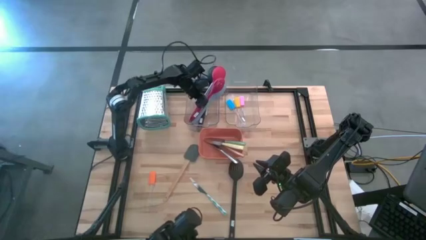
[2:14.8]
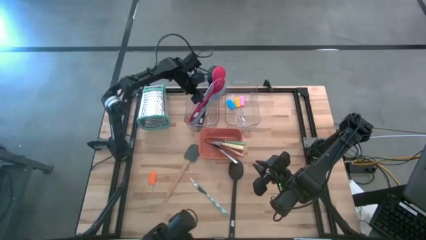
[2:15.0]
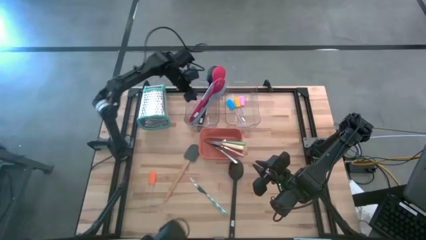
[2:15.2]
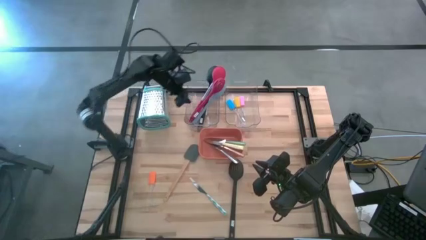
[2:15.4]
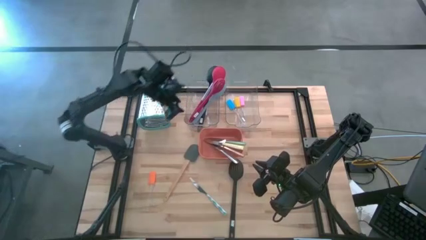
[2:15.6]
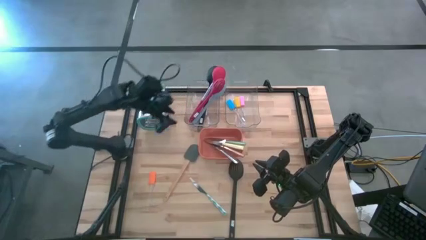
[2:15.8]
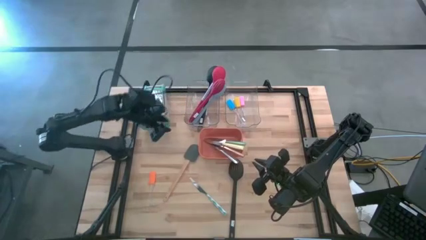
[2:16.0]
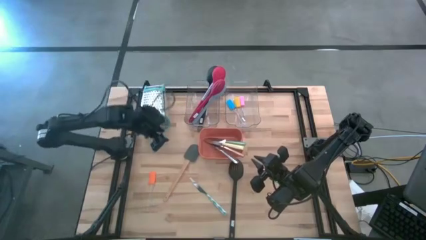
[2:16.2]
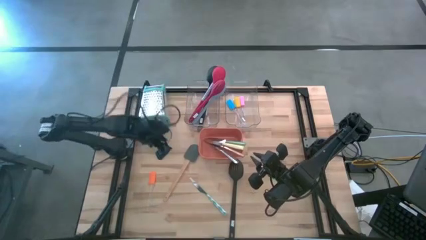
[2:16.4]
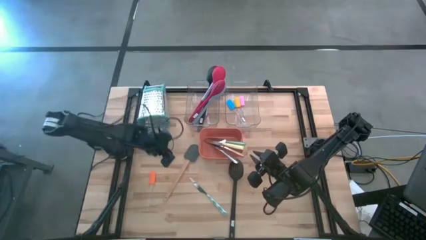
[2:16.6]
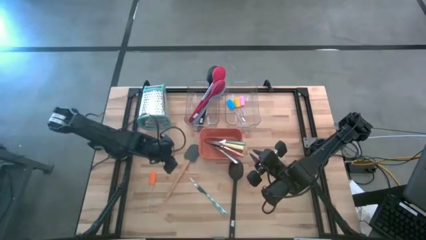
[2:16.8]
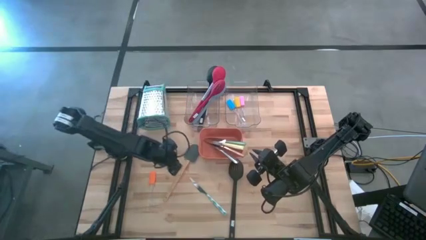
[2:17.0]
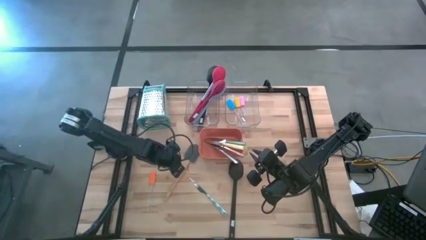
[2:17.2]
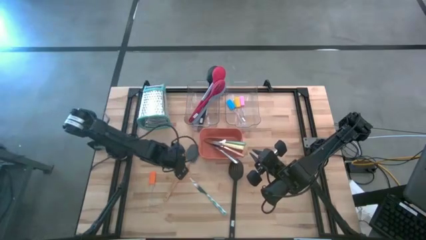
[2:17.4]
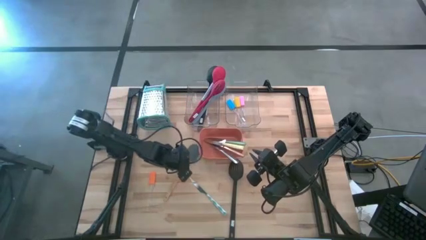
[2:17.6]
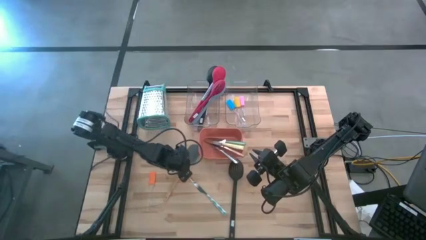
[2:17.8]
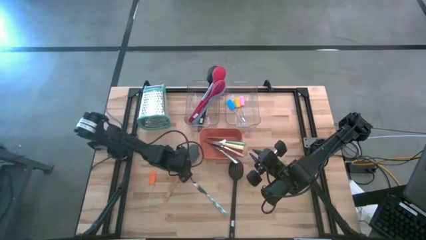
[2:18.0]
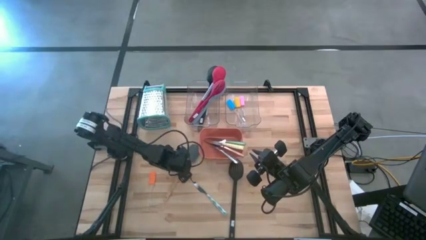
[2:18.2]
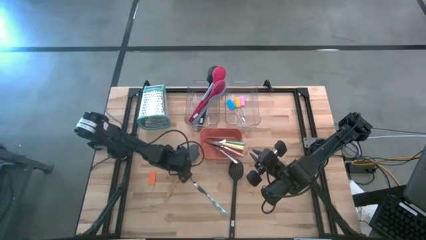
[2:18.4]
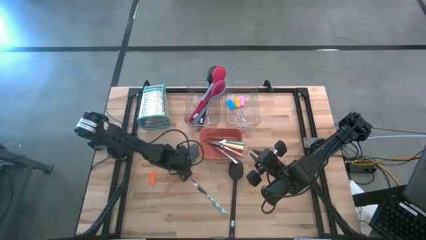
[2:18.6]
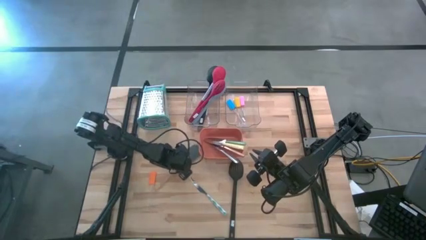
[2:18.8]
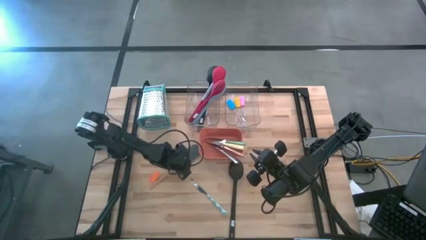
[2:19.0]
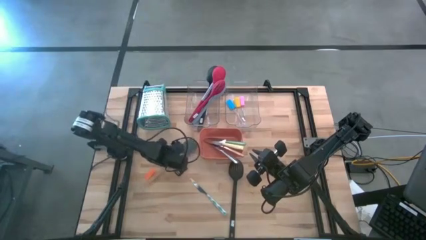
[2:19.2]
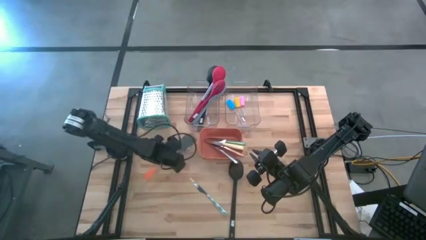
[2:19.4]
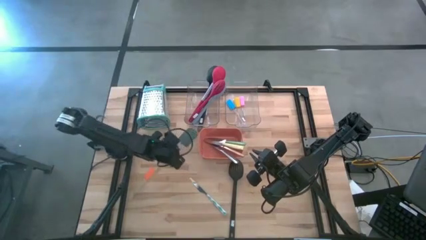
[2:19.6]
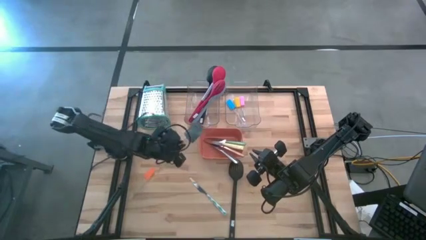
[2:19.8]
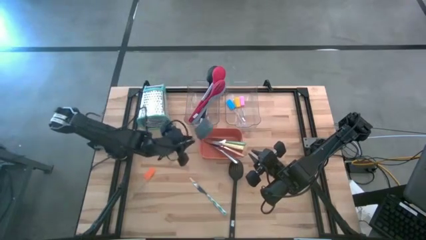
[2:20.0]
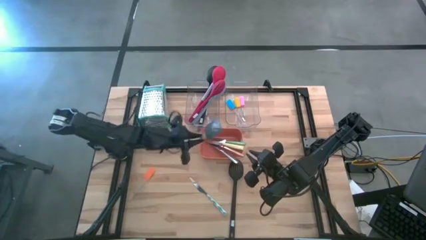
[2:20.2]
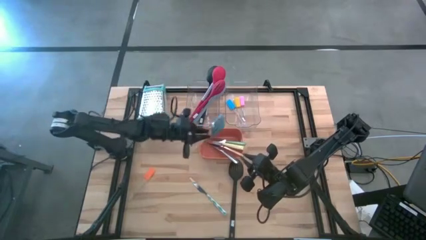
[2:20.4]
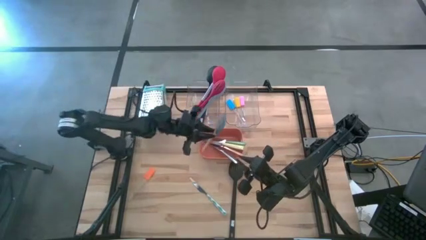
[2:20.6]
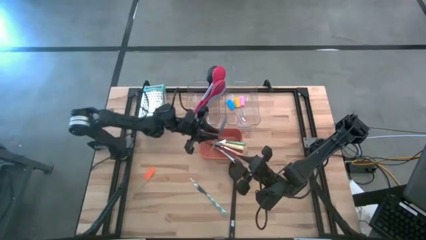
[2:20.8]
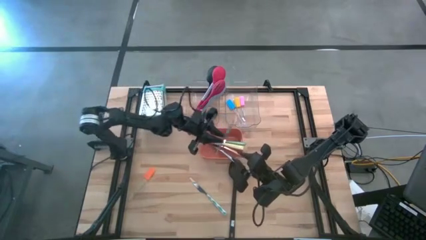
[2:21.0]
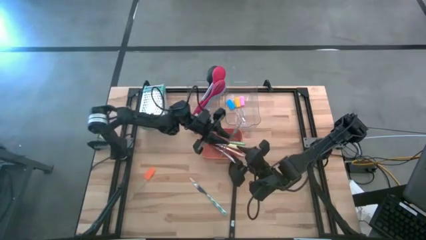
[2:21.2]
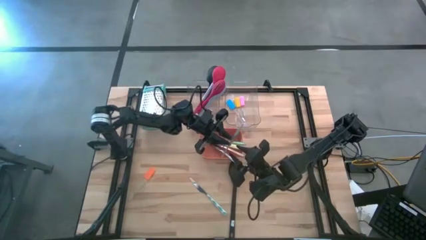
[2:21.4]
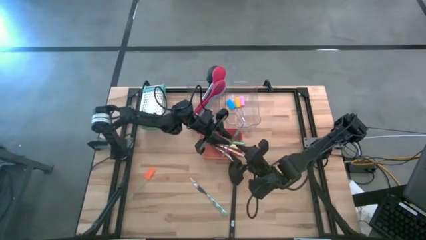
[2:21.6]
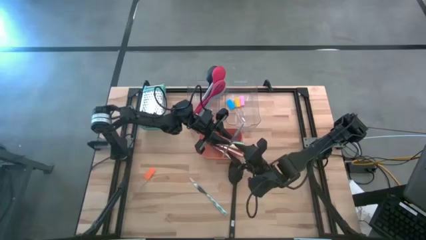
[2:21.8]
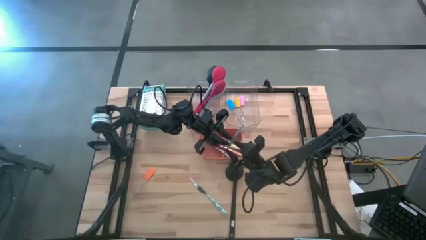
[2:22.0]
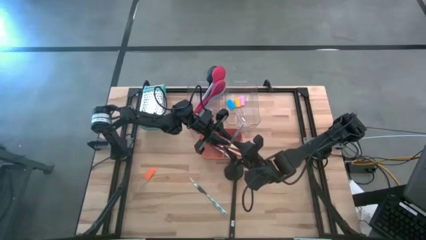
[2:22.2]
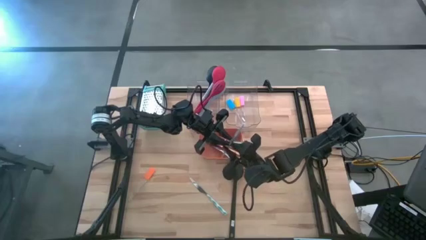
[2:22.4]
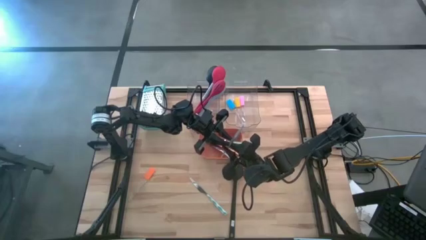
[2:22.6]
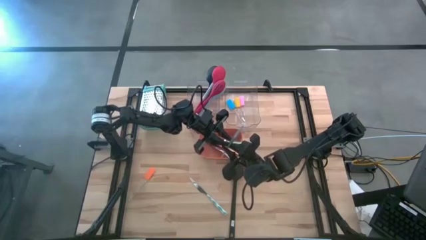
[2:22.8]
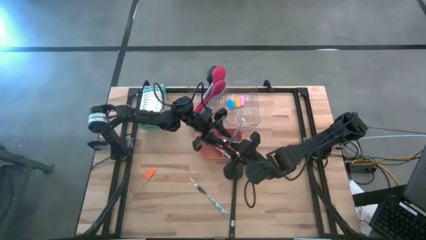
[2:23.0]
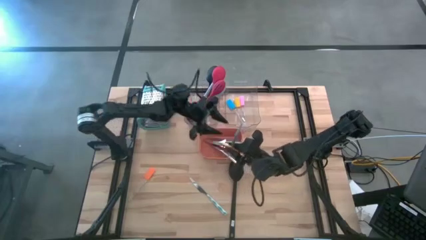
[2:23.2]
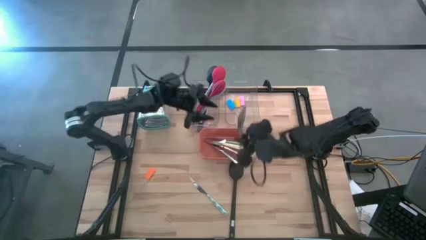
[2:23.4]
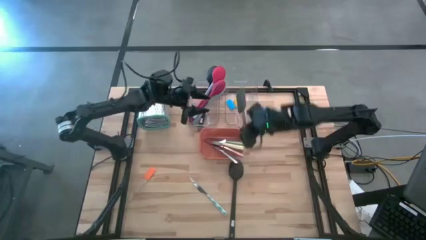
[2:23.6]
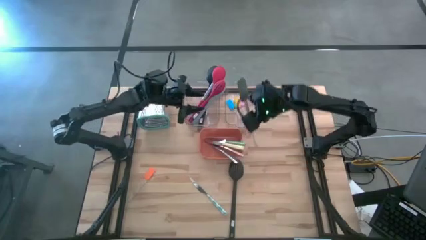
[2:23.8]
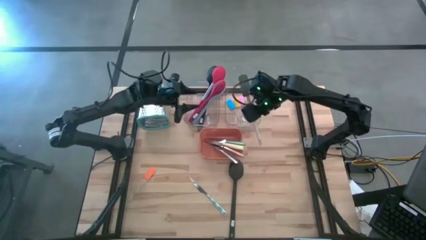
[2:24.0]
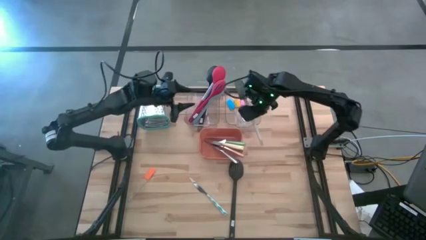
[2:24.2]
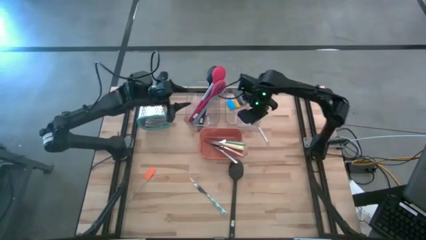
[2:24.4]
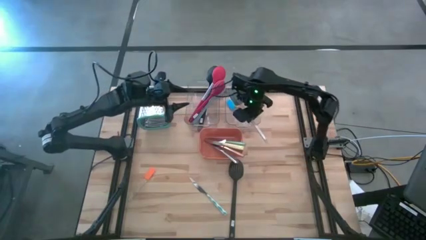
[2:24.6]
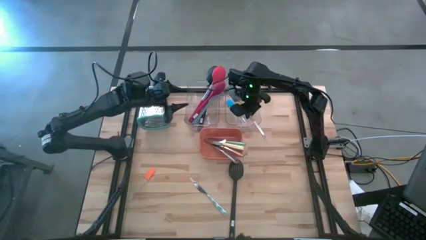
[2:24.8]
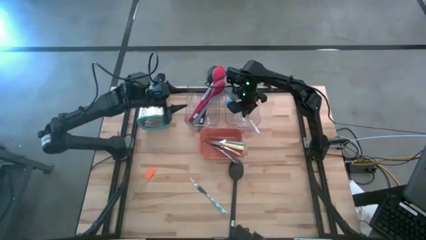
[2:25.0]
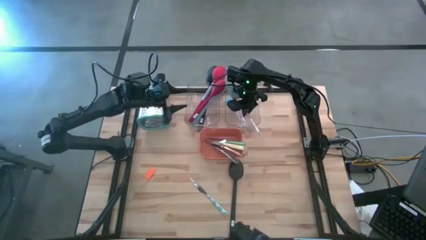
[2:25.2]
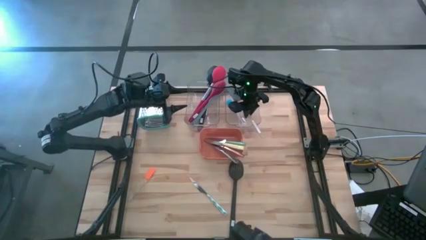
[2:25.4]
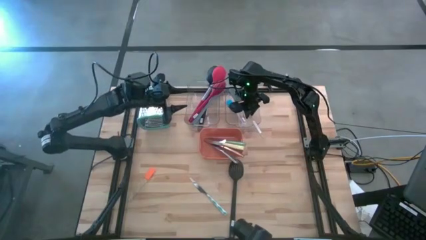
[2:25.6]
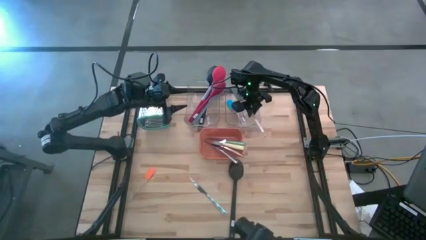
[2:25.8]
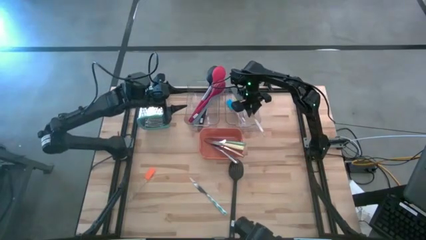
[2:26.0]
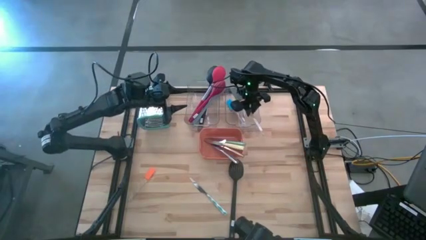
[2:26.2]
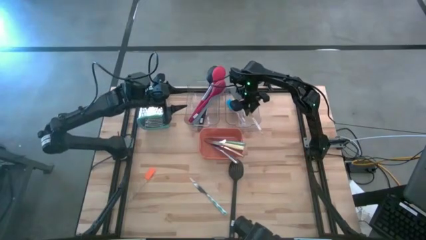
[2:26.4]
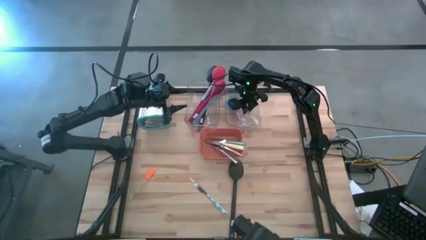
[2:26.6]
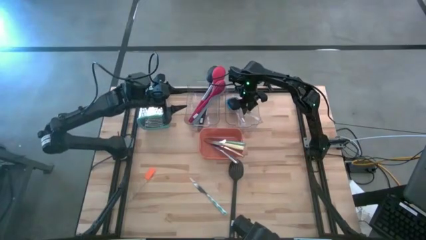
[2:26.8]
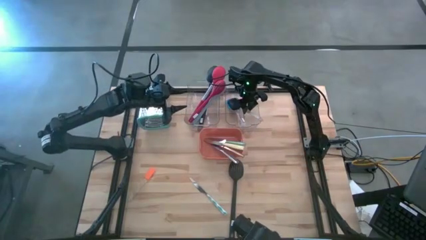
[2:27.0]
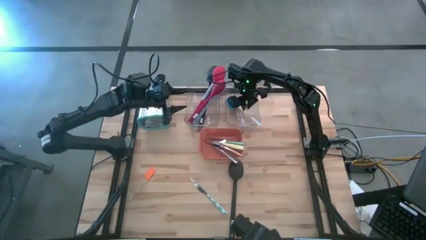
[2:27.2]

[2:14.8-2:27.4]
Task: Pick & Place Kitchen Items
Put the gray spatula into the right transparent bin

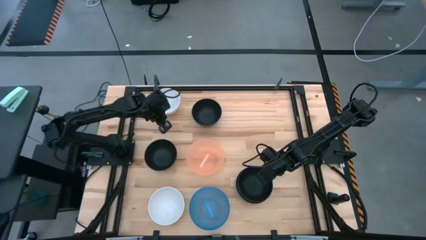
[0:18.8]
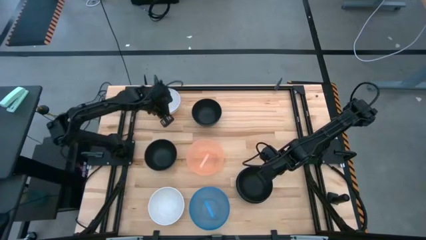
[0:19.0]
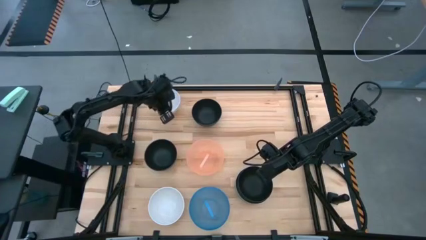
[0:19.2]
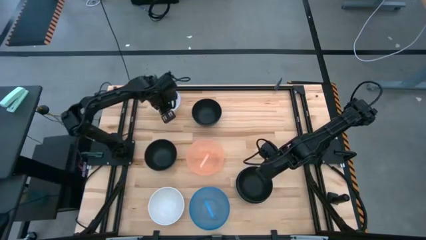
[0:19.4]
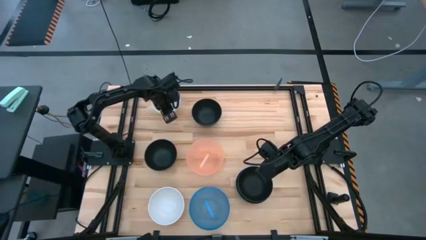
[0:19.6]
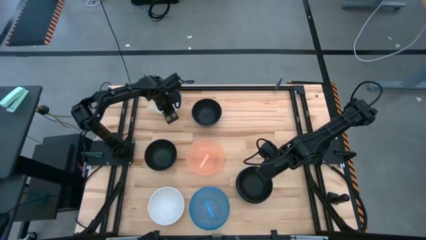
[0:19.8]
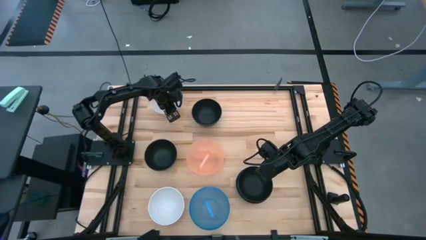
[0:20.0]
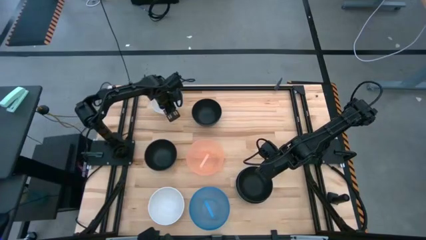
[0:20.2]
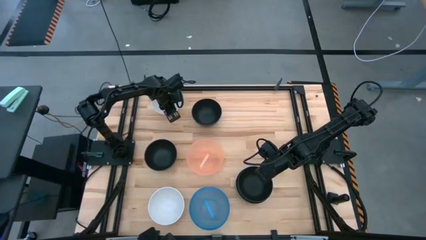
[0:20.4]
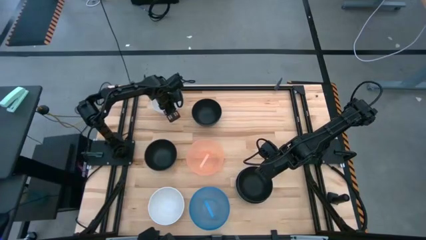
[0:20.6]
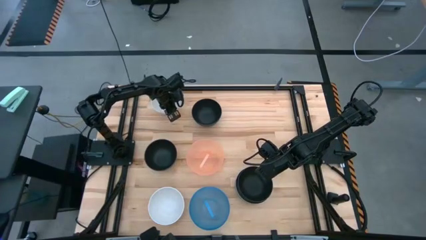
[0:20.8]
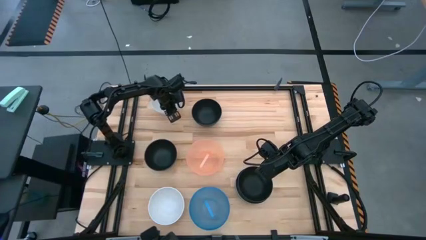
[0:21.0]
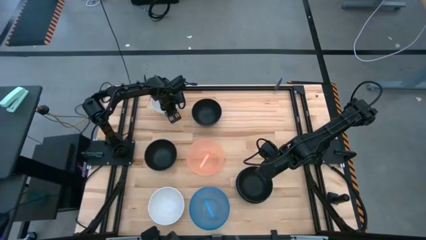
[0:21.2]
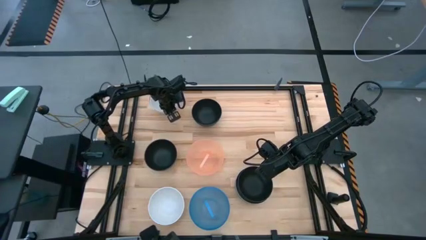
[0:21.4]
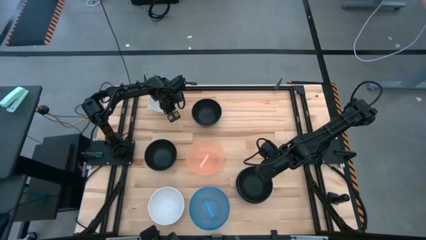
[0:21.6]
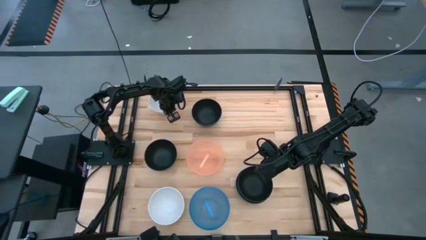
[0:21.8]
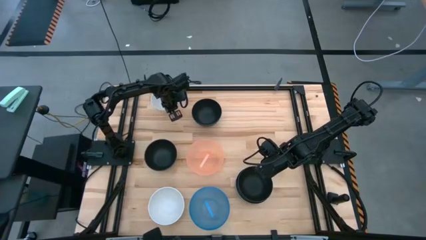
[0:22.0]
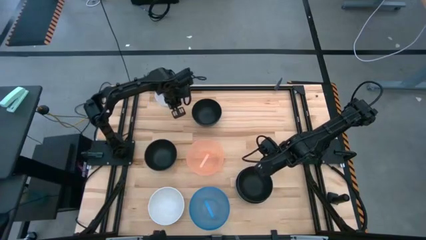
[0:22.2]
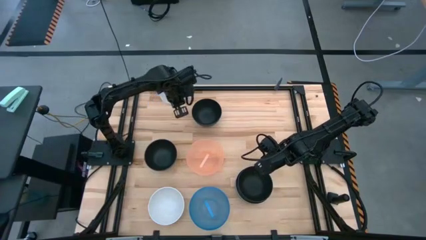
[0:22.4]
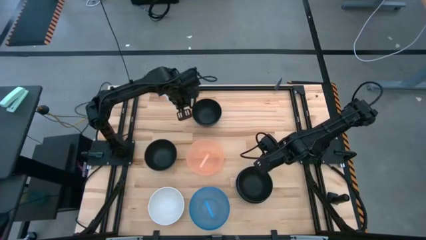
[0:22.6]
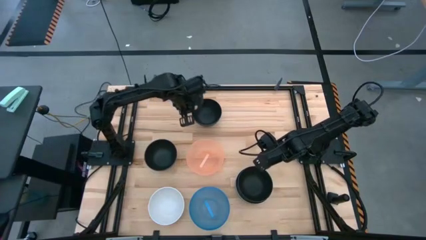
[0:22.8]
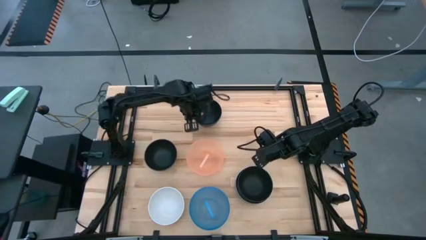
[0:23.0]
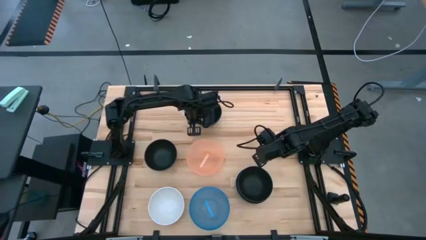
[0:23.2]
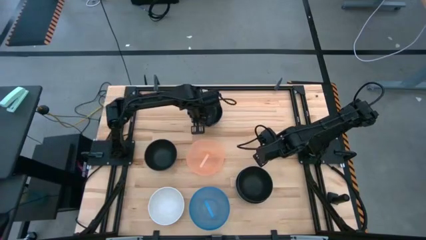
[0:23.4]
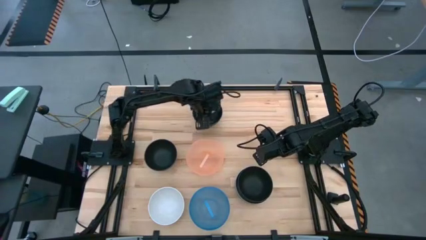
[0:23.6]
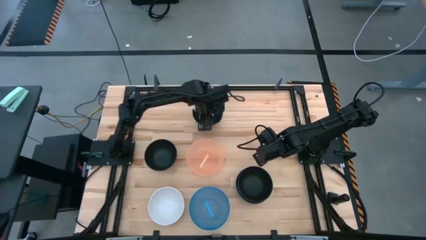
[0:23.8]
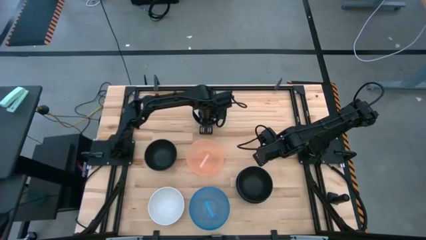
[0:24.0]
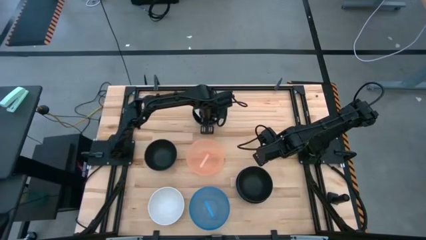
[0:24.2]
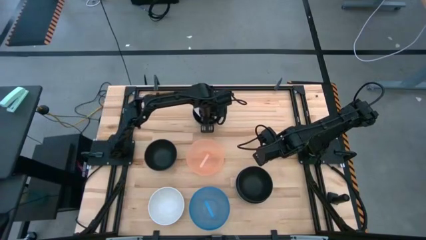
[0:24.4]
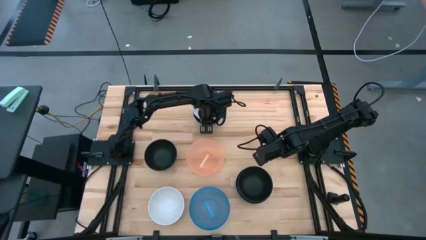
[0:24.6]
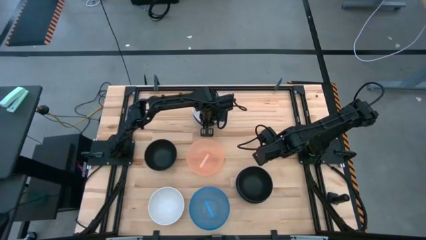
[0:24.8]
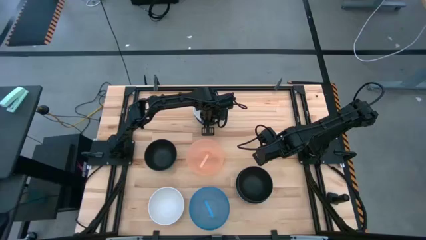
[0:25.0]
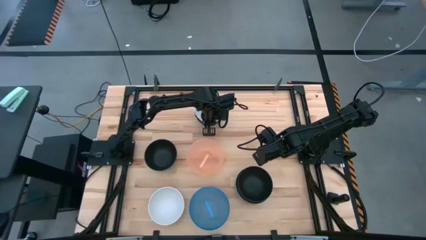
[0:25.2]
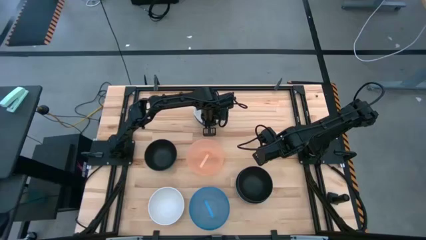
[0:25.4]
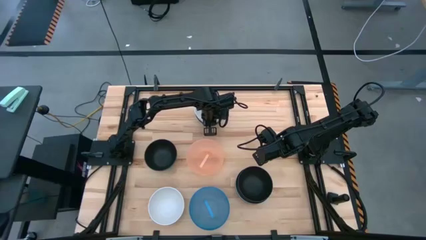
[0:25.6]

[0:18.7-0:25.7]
Task: Nest bowls inside each other
Stack the top white bowl on top of the top black bowl
